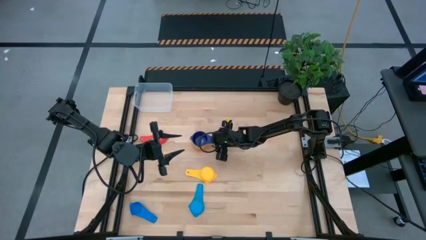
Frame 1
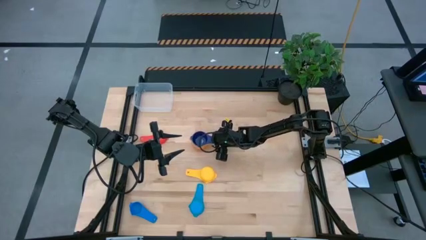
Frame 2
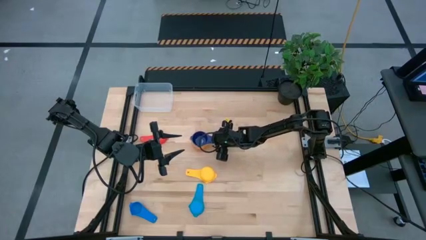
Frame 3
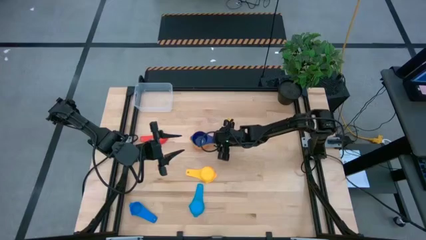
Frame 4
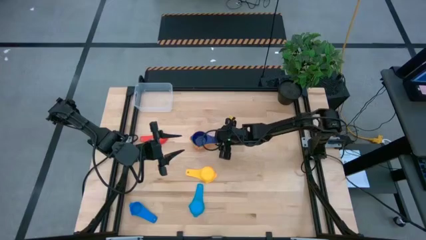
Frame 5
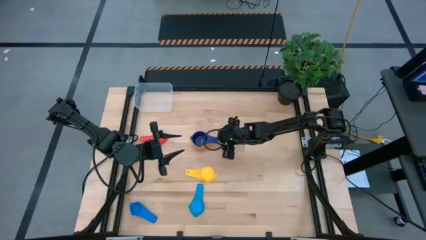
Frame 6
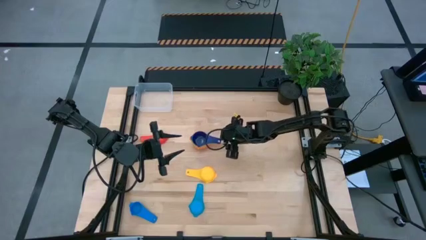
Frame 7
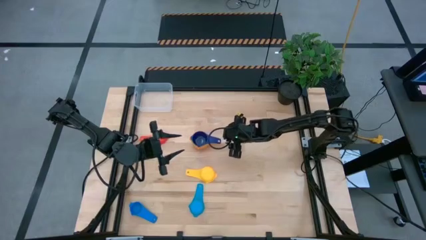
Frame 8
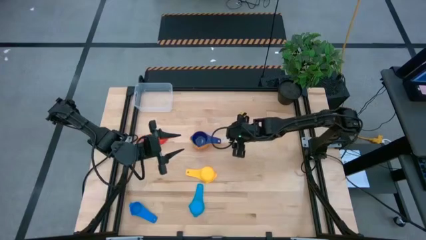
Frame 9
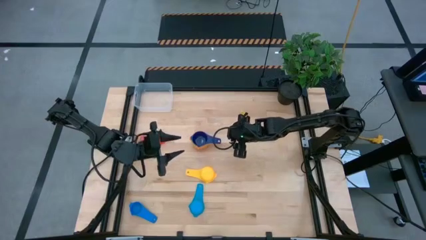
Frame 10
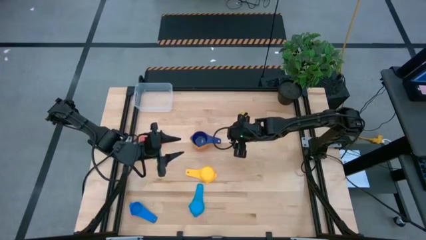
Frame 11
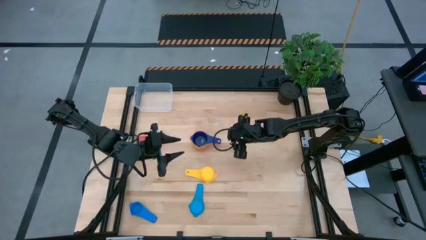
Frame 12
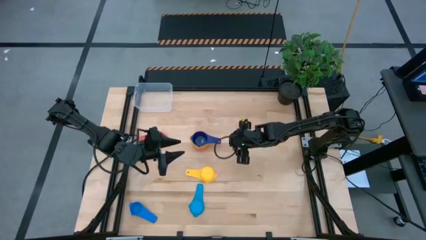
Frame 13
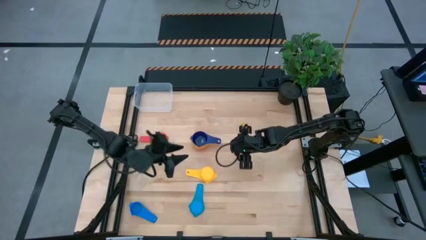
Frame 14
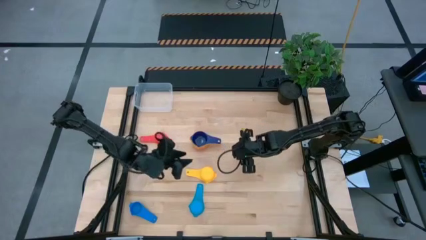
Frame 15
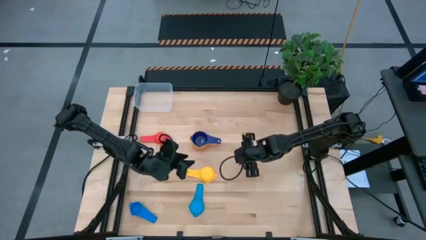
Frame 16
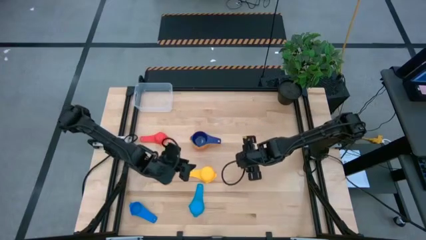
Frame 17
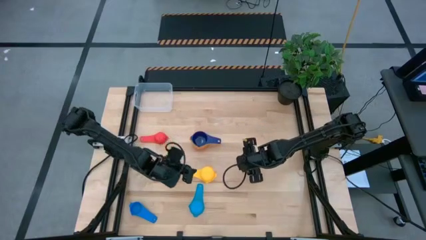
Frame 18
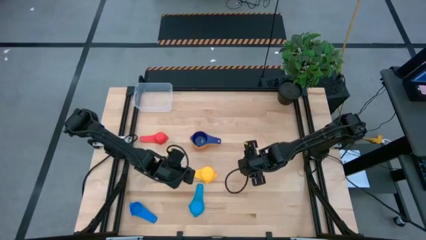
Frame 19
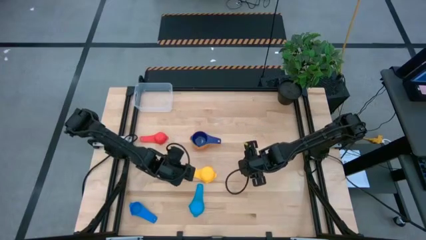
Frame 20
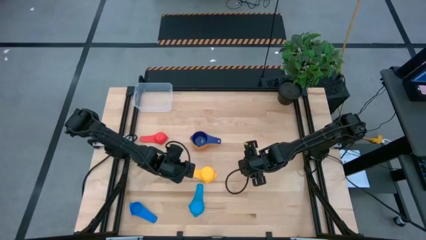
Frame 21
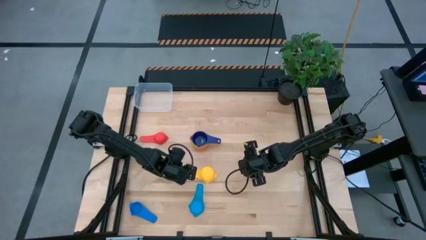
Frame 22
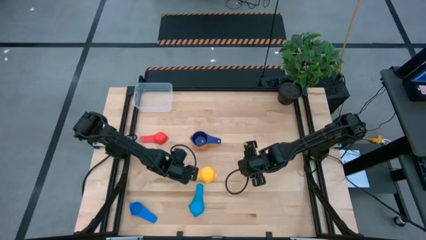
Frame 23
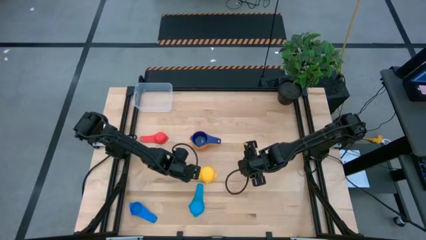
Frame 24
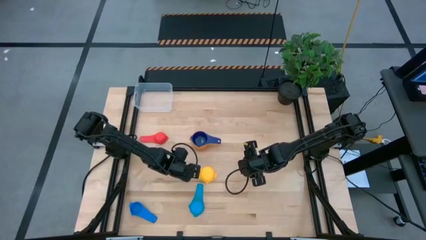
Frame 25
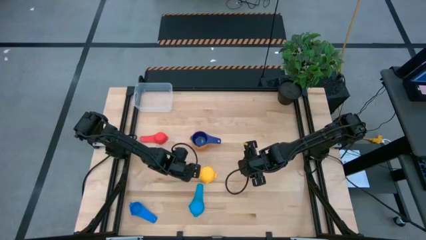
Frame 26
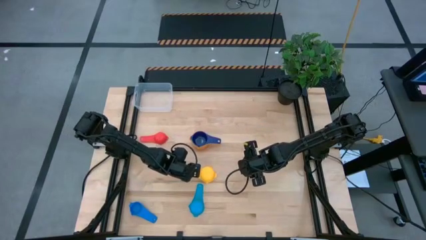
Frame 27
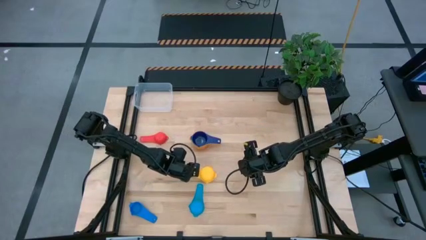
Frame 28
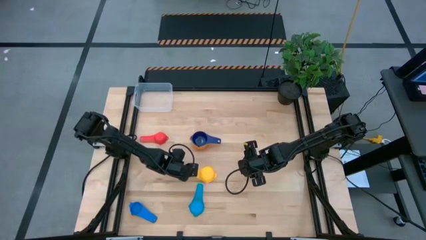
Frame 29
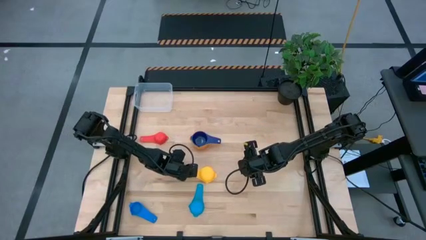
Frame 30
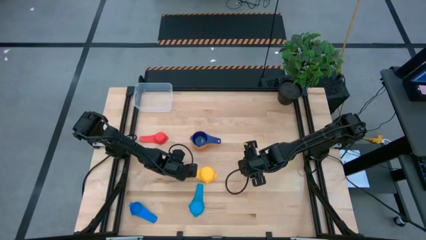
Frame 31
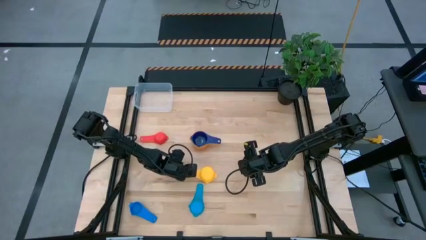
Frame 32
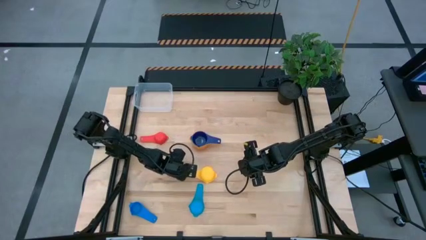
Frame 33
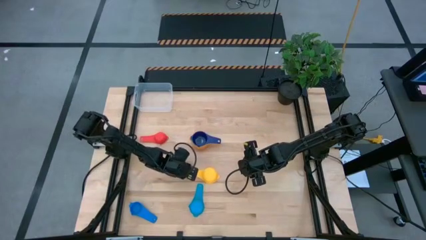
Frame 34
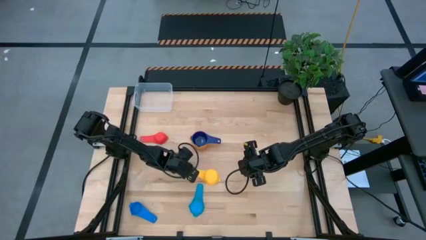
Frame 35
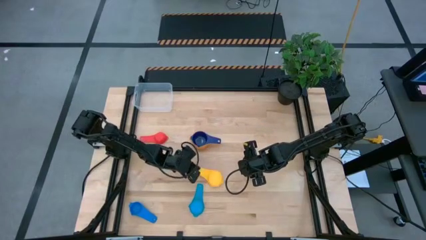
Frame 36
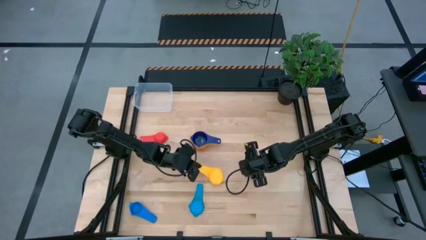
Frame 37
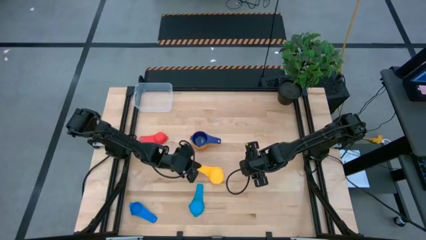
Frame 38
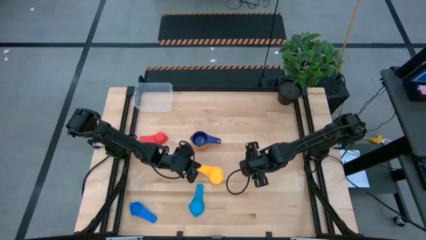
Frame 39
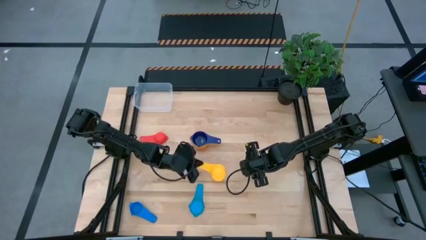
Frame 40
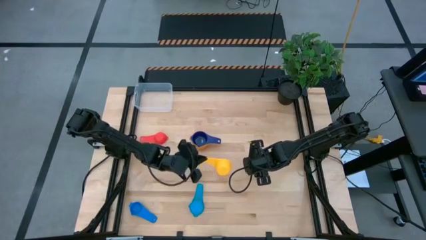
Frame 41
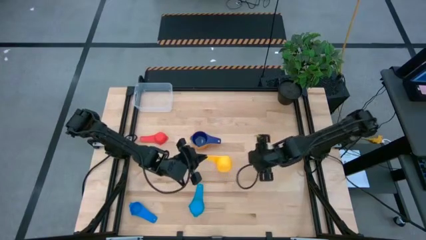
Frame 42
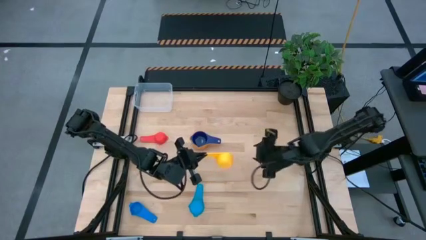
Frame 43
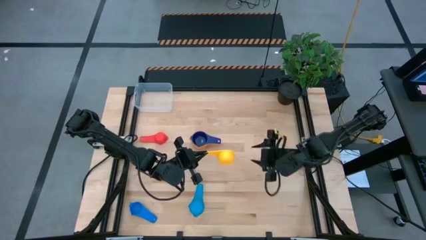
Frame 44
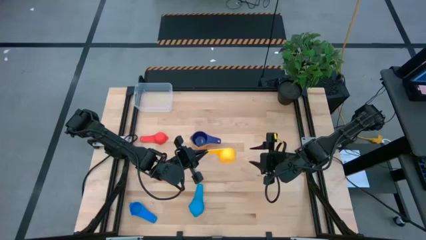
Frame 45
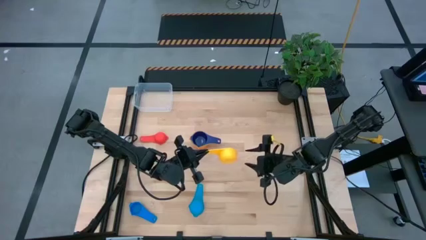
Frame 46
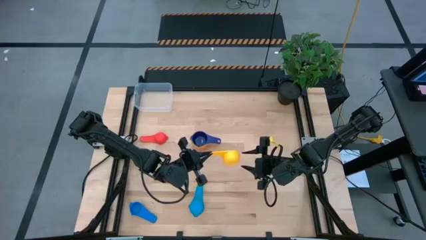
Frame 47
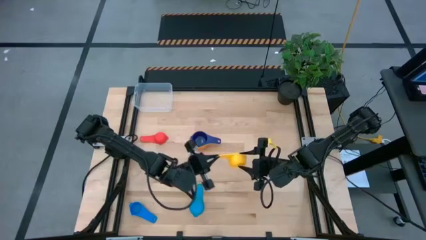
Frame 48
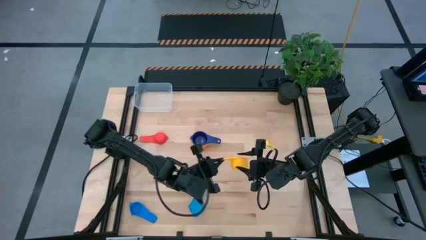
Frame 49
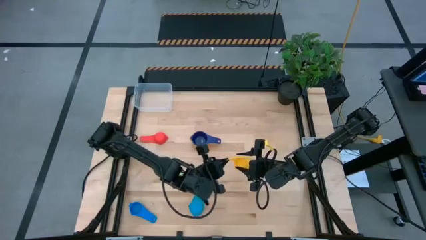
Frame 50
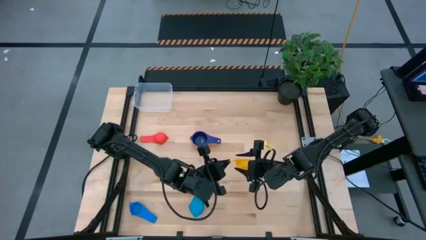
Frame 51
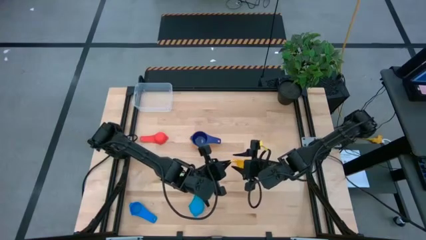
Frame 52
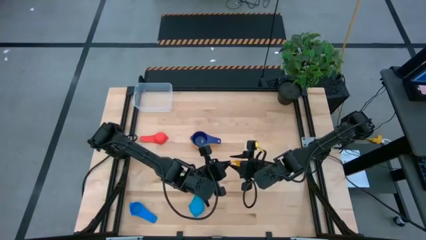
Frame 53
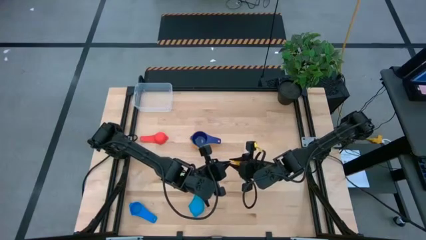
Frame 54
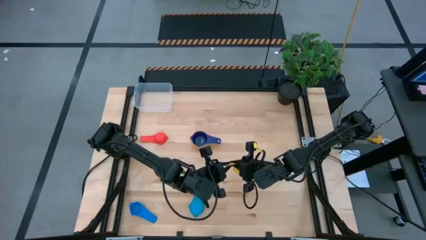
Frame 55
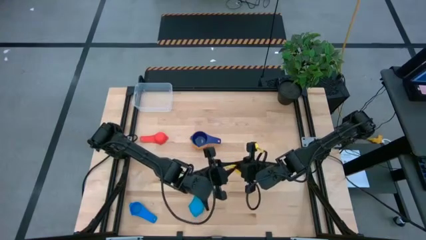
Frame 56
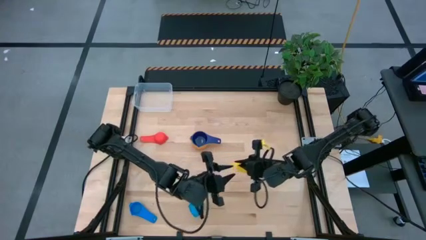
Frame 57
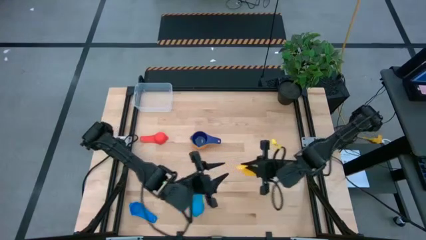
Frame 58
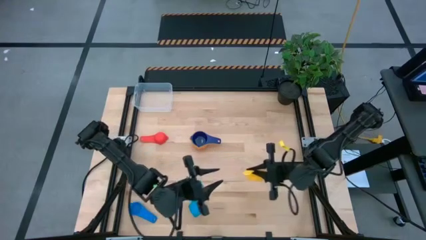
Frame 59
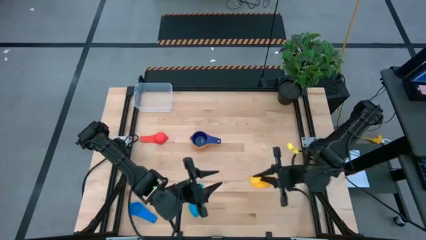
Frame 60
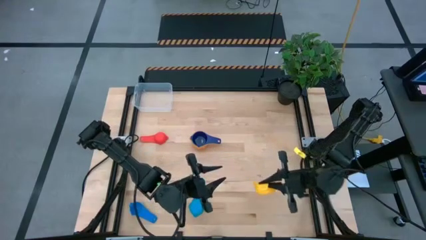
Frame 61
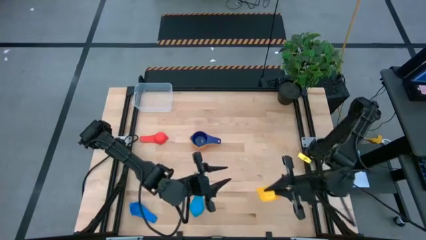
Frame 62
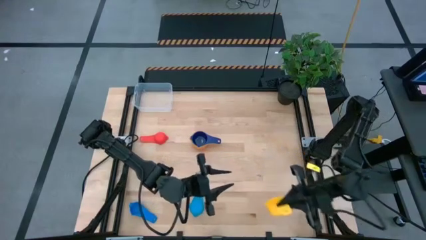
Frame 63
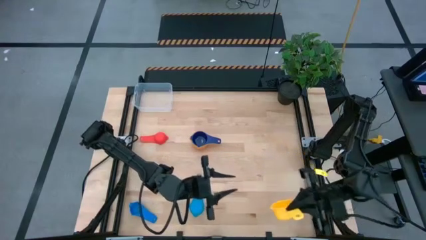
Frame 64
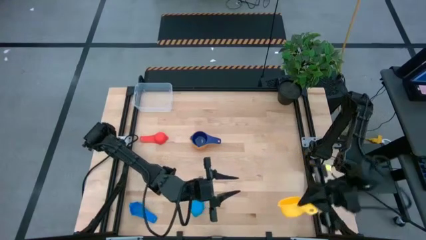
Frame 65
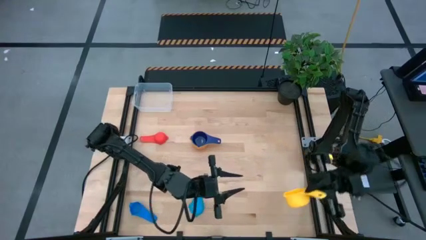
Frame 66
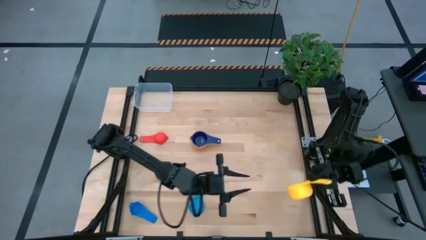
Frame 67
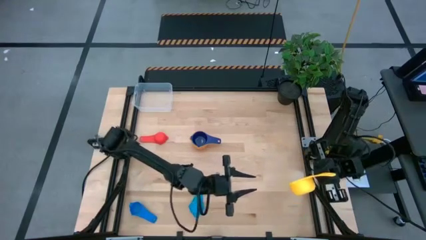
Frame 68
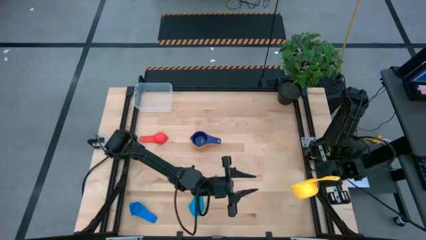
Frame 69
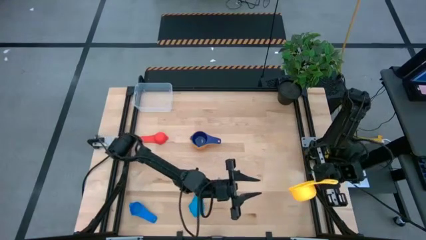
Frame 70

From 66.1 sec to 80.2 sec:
Task: Nest measuring cups in basket
Stack the yellow measuring cup on top of the violet measuring cup

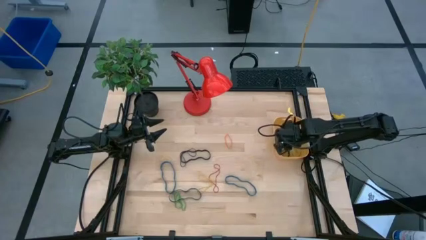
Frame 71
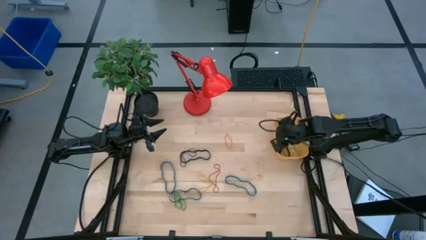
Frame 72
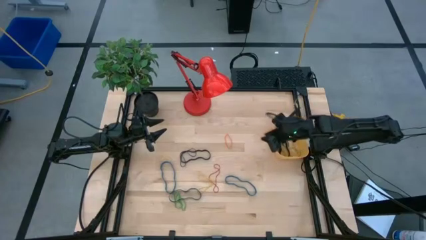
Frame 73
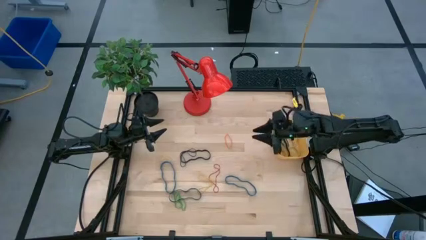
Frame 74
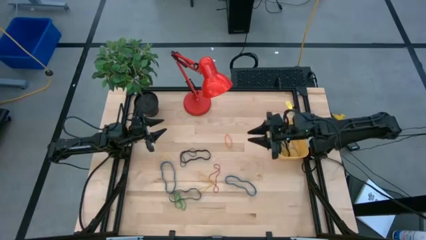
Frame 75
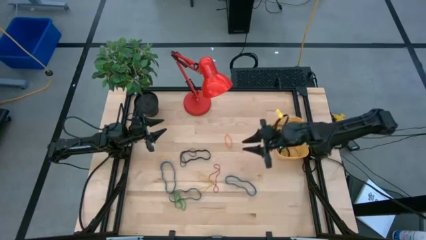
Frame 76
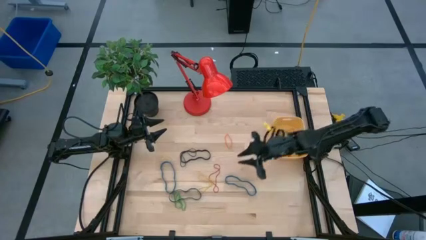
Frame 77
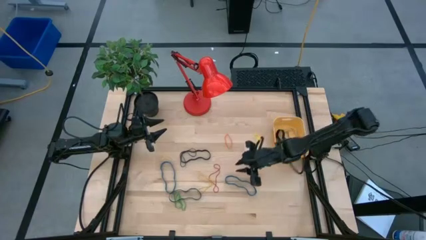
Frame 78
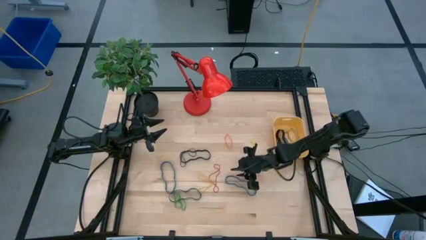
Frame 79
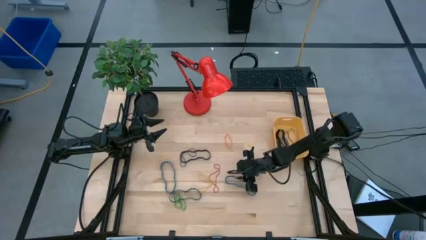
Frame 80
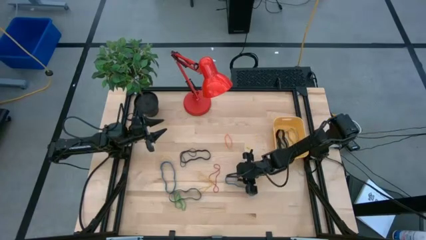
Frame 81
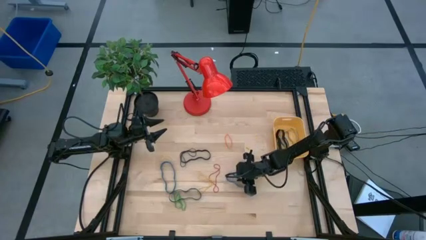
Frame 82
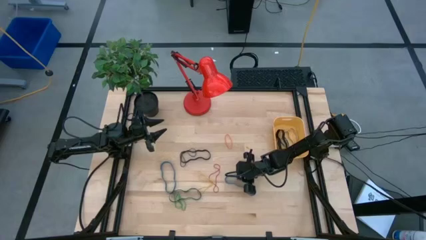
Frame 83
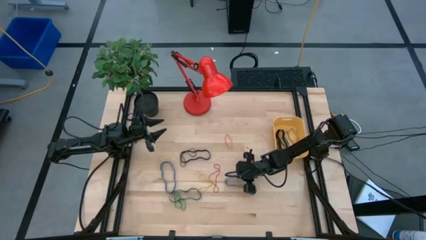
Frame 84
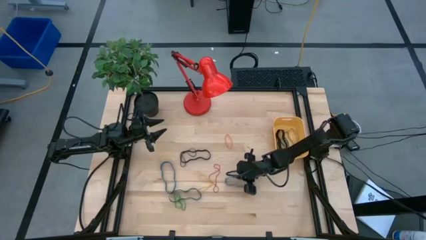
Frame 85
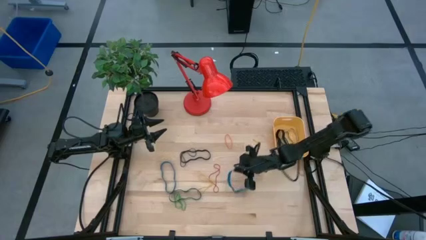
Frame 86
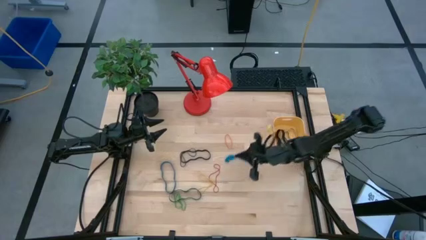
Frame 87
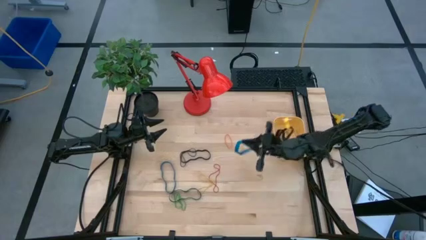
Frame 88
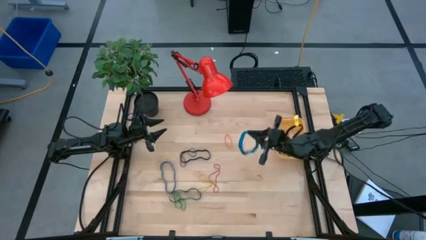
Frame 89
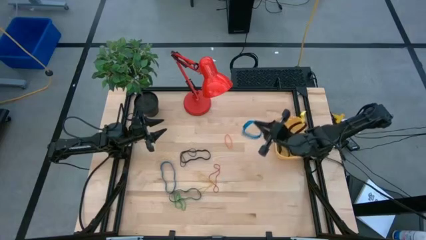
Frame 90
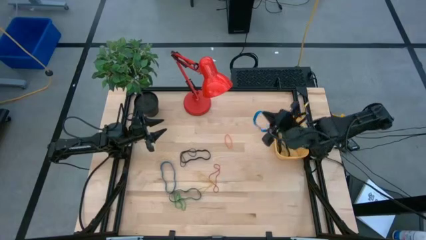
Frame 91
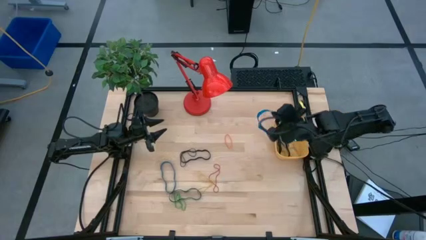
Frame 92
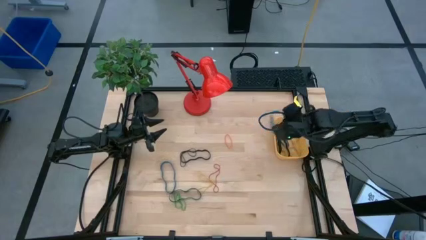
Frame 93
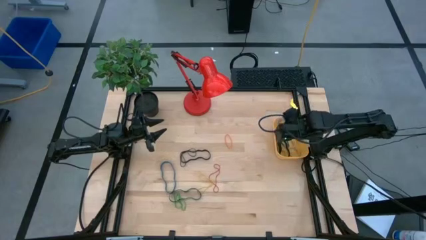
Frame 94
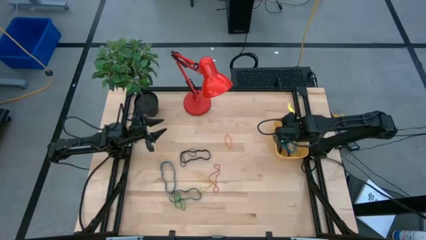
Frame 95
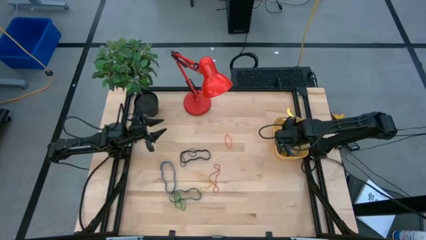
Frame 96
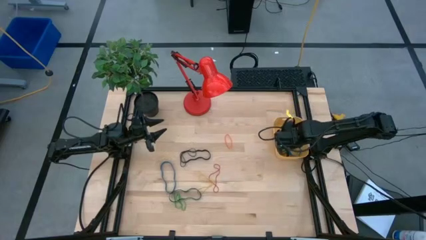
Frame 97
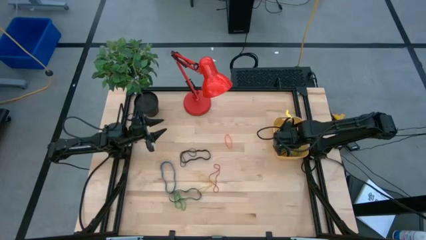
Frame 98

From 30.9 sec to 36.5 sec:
Task: Pick and place rubber bands into bin
Put the right blue rubber band into the yellow bin
